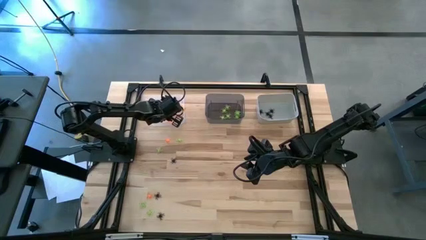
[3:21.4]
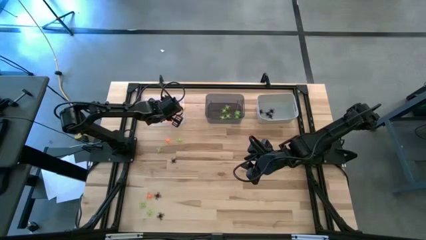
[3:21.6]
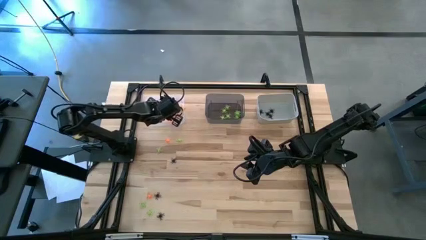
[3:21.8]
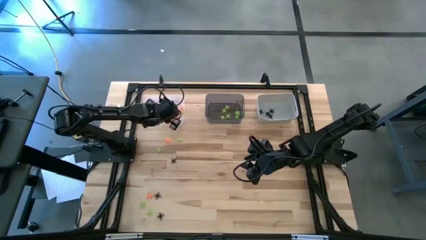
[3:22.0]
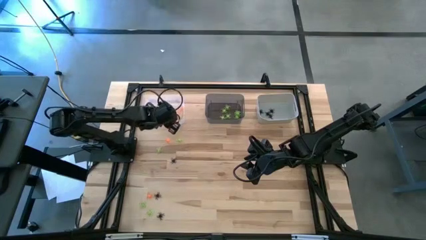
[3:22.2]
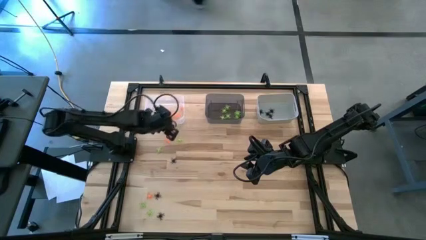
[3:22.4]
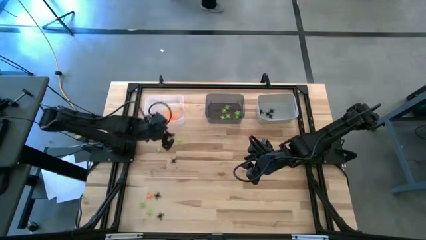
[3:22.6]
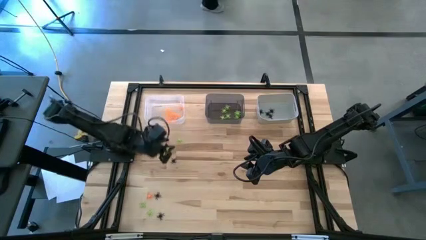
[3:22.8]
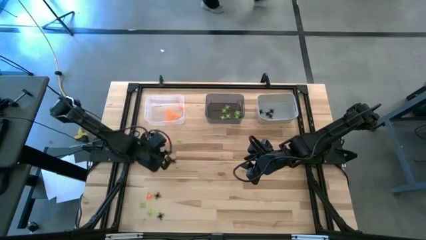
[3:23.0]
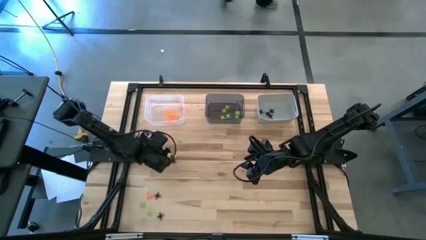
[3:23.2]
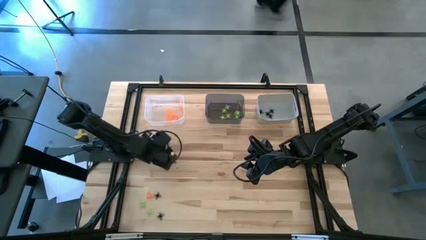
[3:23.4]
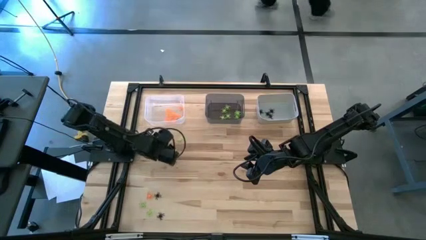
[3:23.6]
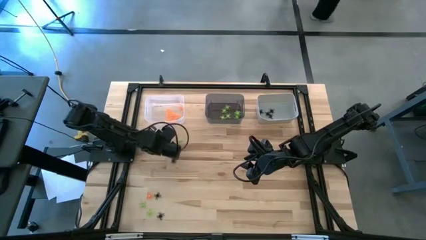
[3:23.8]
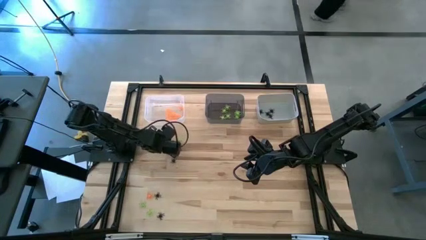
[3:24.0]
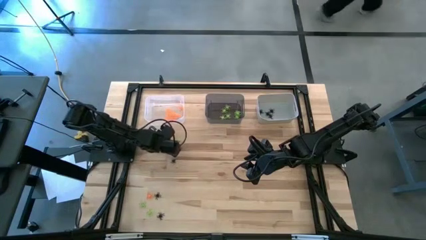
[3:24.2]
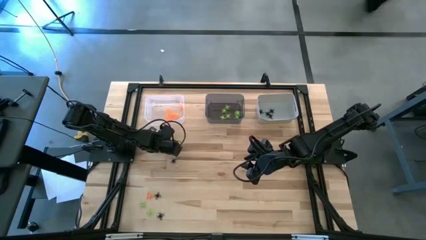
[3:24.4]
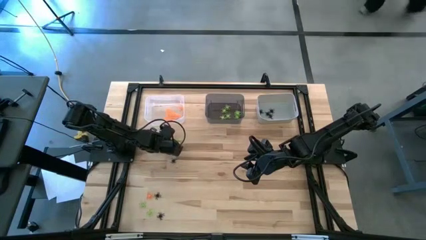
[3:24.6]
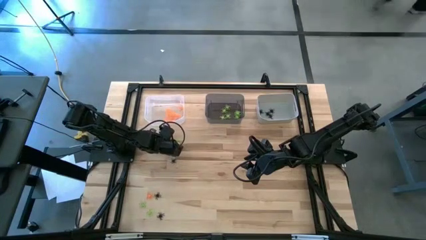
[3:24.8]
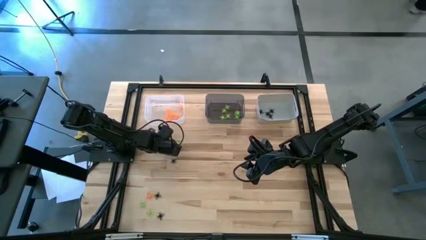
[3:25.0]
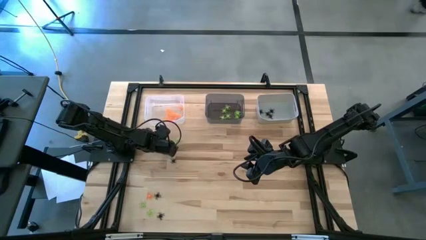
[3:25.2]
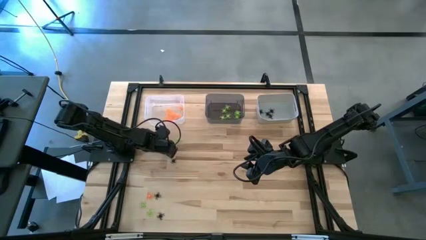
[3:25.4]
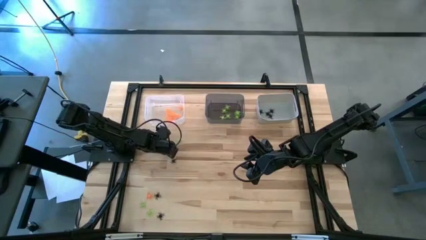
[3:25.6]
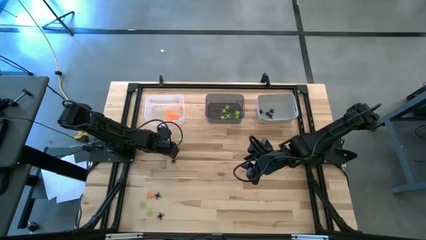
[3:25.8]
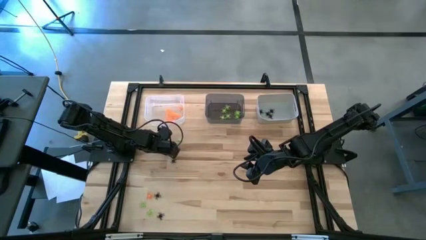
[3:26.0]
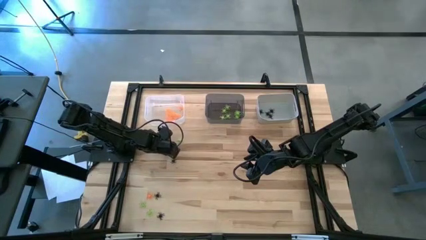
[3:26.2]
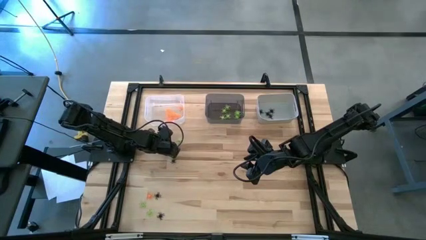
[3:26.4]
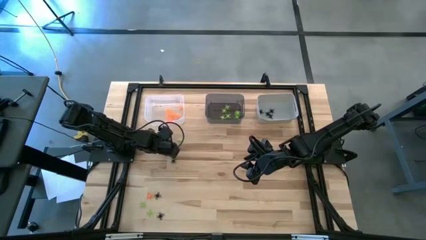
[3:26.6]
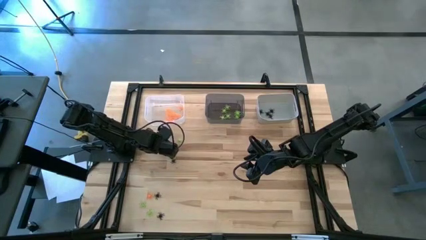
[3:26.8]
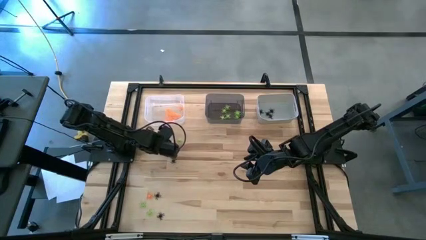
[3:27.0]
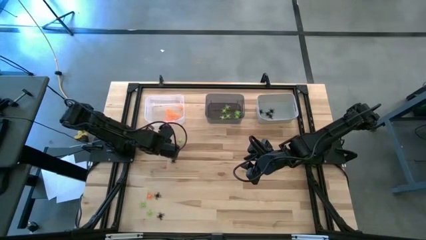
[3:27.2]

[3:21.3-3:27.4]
Task: Sort Halloween decoration
Put the orange spider toy into the transparent bin

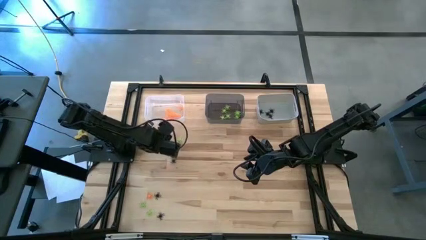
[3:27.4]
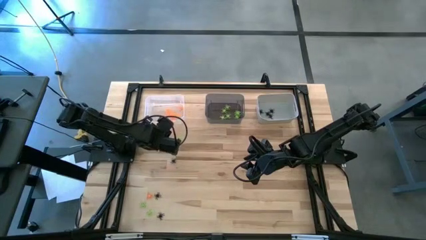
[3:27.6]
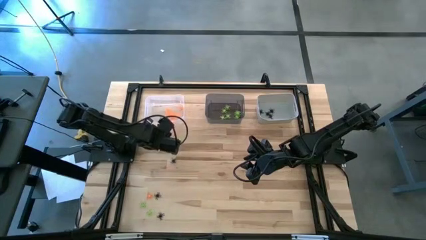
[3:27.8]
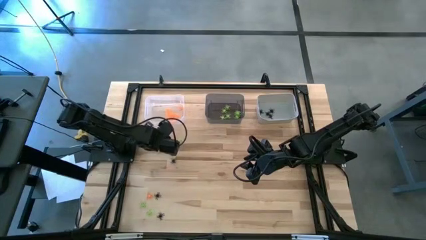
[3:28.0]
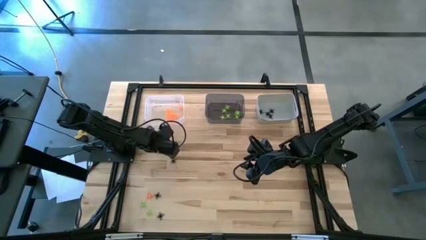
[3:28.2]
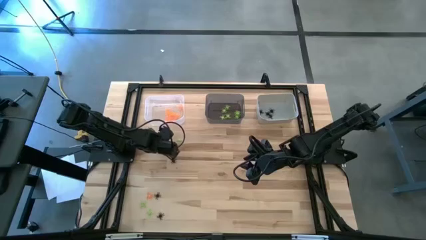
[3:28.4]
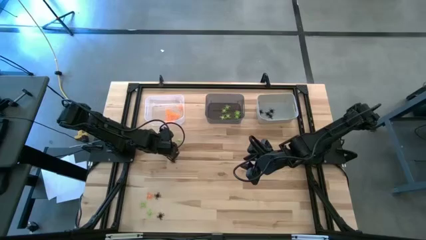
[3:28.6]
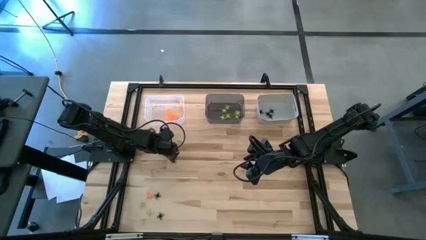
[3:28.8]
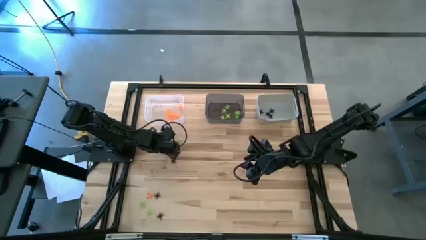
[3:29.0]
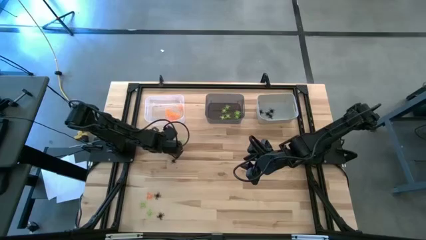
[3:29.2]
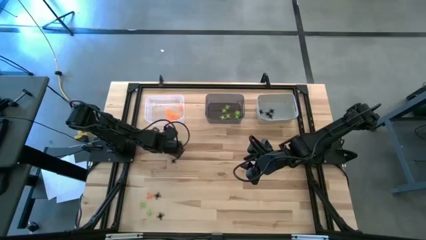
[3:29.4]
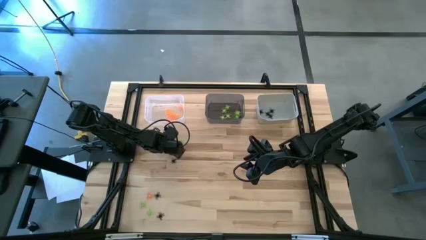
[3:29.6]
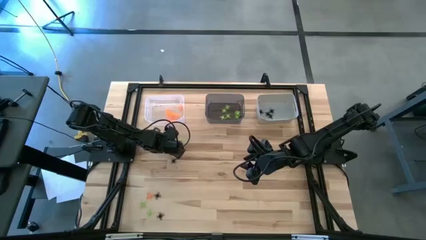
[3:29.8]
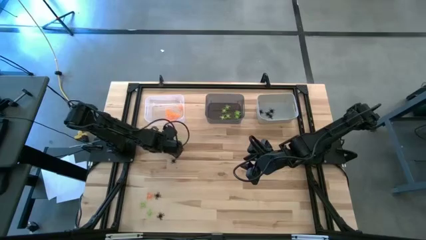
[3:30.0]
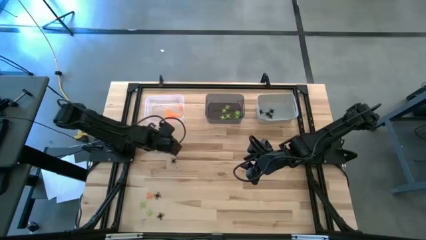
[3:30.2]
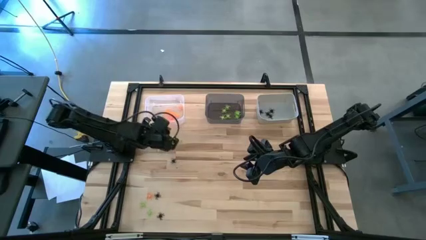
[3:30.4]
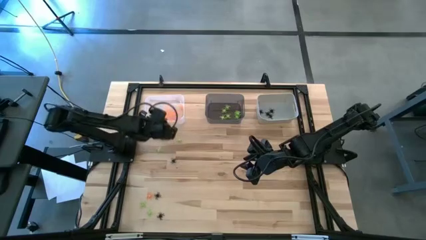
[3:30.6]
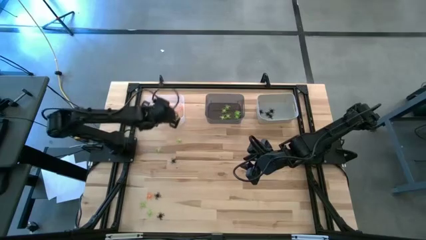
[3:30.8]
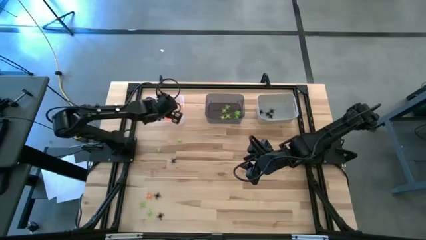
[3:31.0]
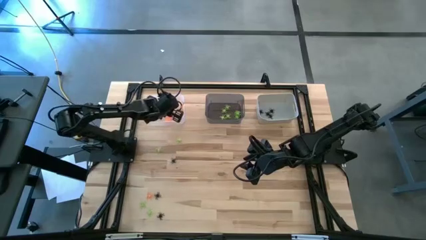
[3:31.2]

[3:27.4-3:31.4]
Put the orange spider toy into the transparent bin

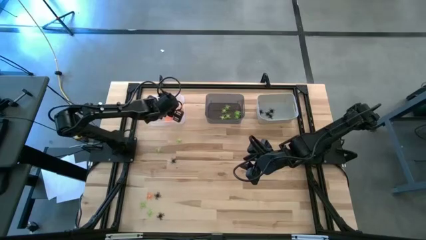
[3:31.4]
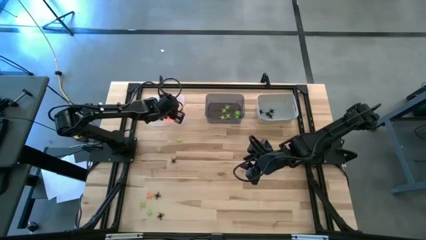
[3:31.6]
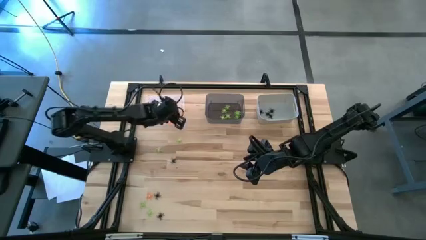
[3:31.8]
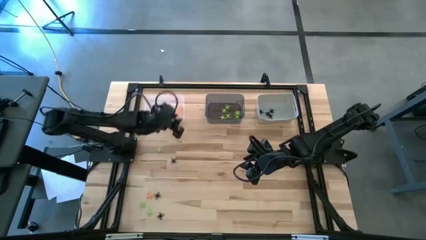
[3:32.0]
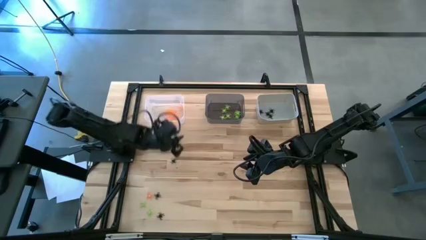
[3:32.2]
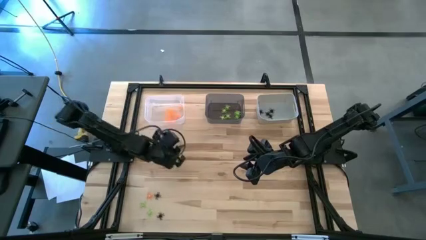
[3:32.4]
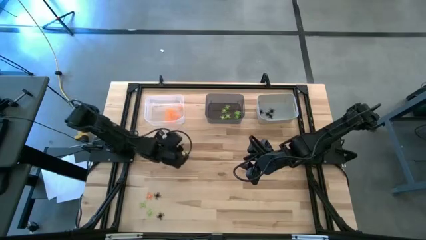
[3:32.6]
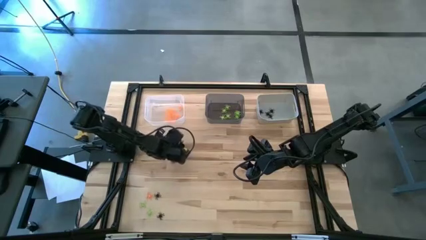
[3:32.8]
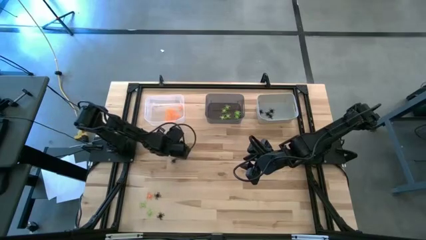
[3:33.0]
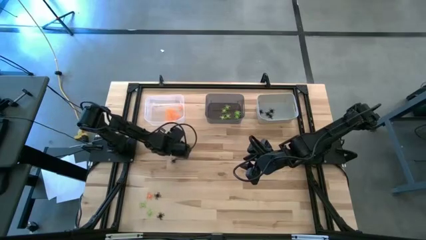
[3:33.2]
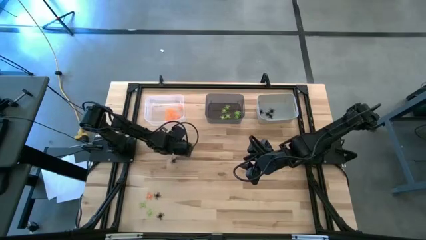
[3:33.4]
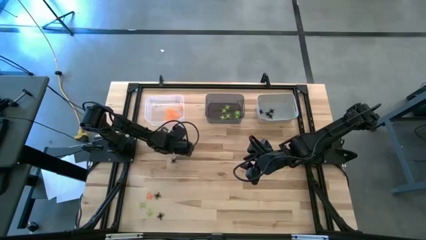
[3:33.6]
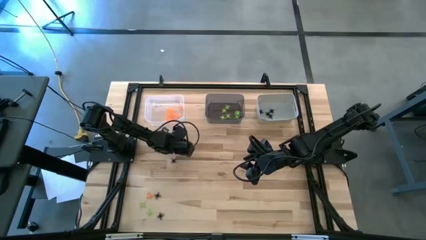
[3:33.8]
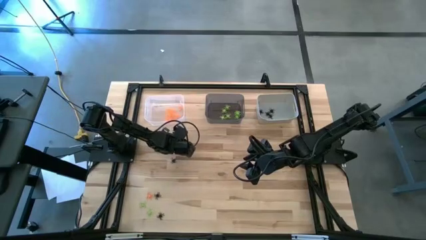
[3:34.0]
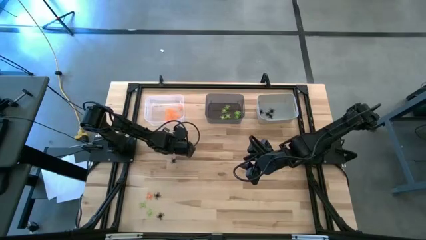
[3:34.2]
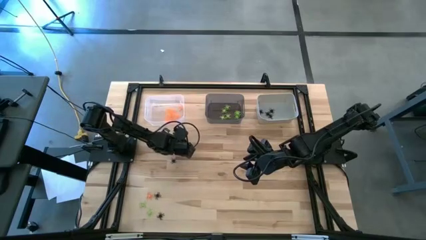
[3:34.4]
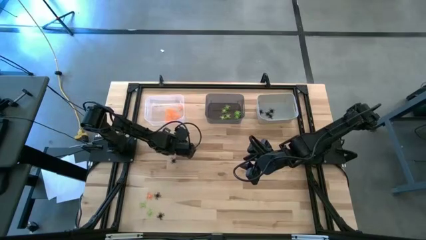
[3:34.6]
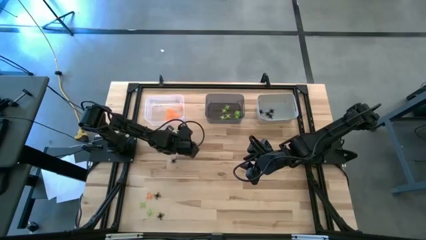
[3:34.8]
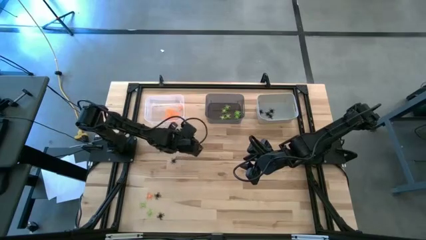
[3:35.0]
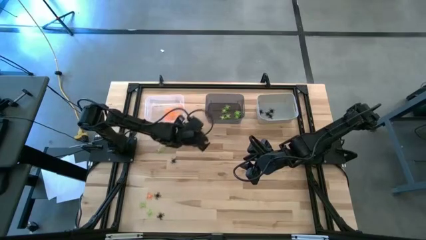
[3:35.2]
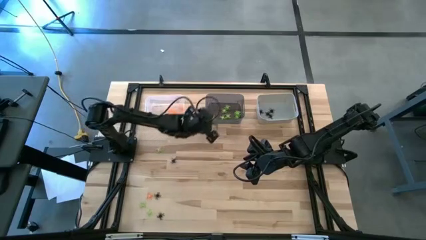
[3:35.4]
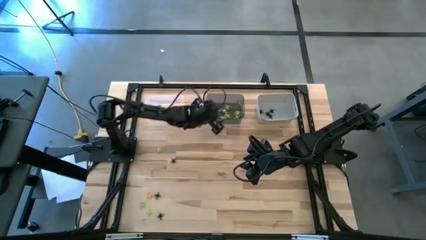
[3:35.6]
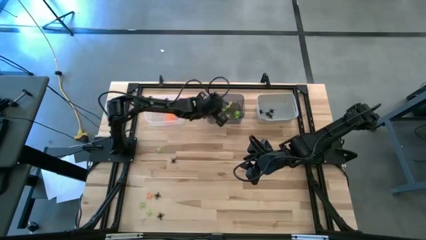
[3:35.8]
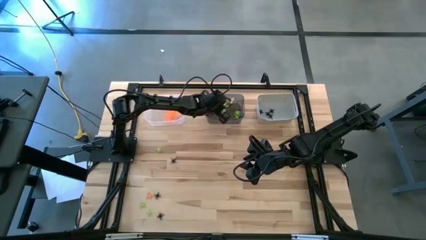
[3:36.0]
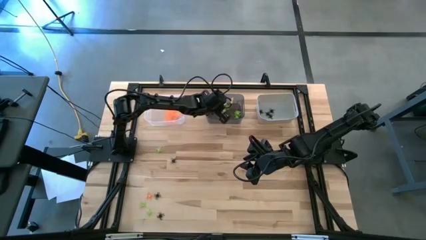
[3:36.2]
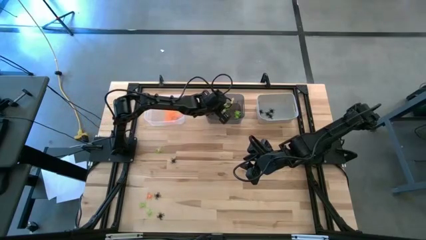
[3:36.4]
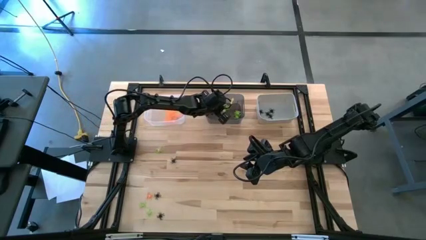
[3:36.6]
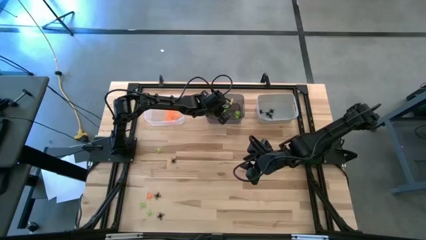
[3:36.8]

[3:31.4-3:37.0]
Put the green spider toy into the black transparent bin
